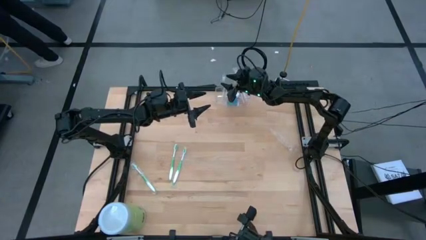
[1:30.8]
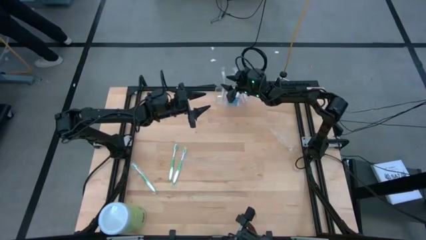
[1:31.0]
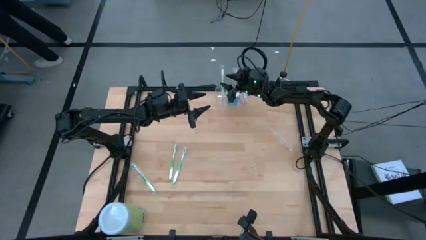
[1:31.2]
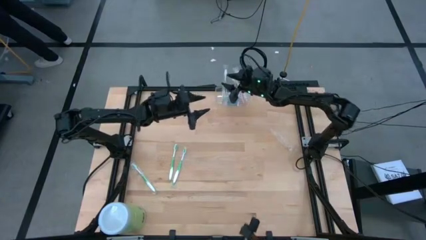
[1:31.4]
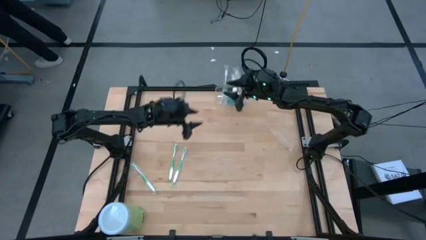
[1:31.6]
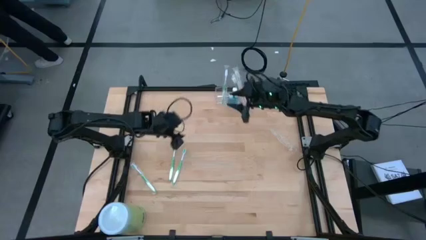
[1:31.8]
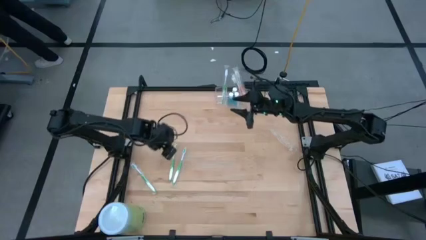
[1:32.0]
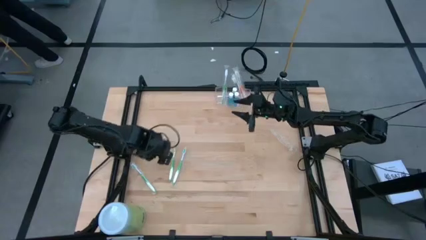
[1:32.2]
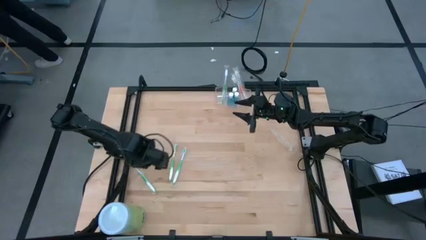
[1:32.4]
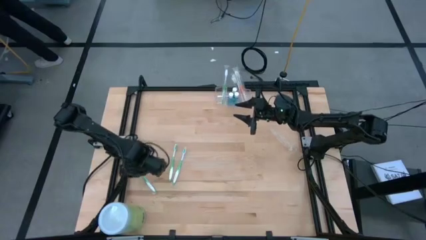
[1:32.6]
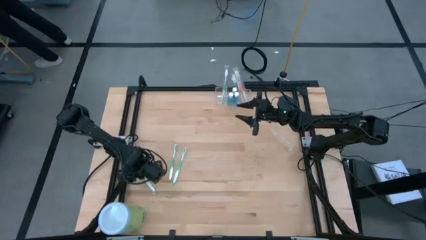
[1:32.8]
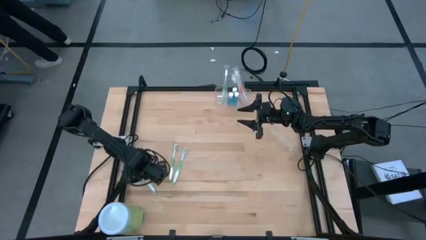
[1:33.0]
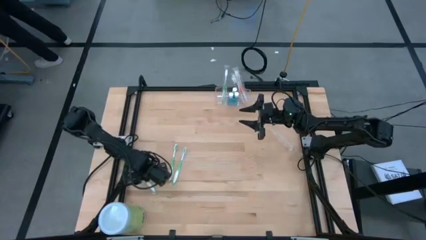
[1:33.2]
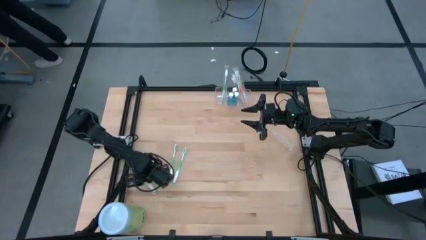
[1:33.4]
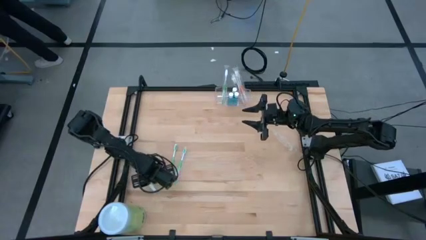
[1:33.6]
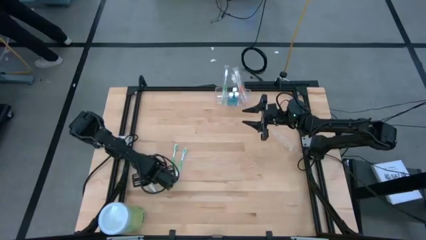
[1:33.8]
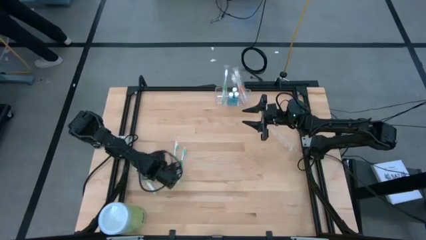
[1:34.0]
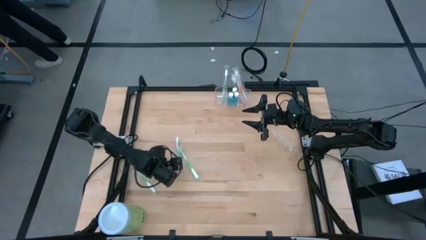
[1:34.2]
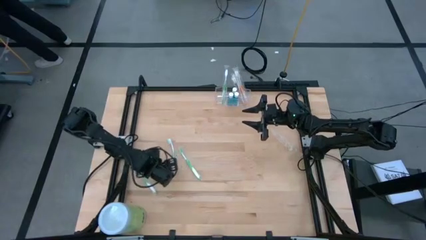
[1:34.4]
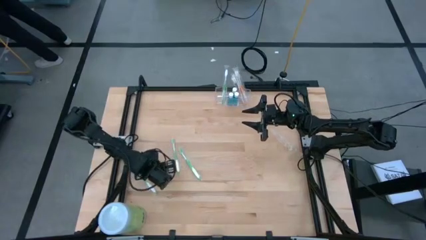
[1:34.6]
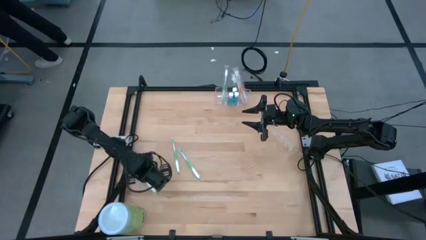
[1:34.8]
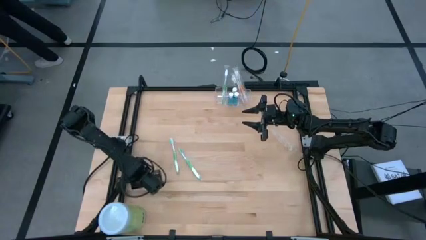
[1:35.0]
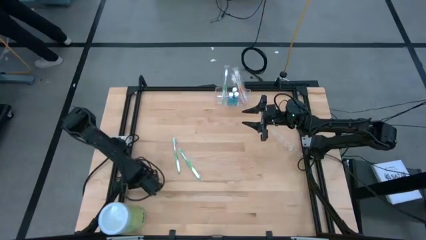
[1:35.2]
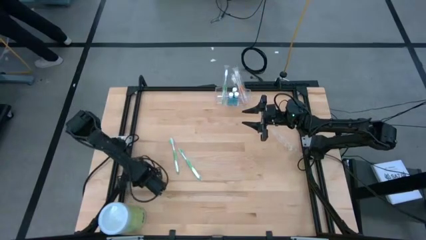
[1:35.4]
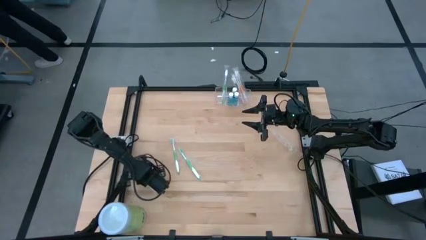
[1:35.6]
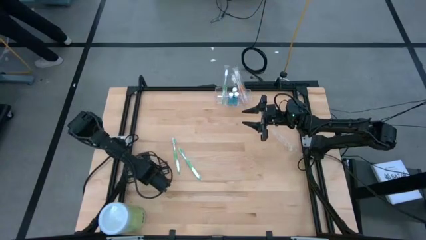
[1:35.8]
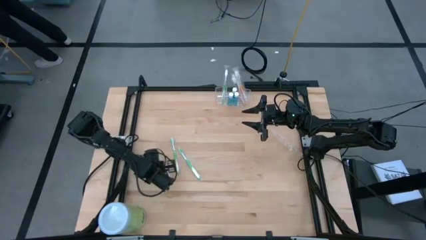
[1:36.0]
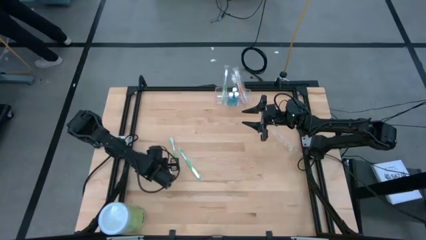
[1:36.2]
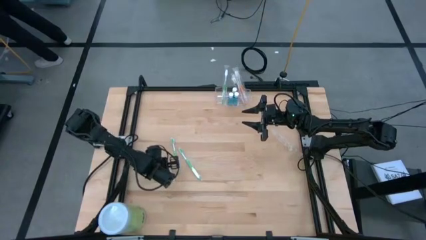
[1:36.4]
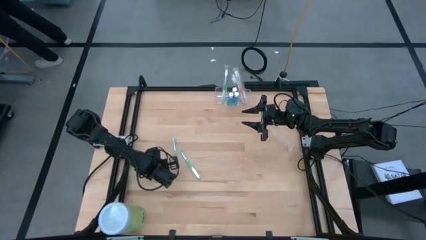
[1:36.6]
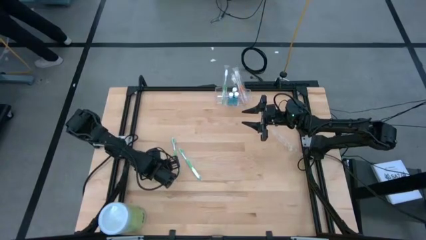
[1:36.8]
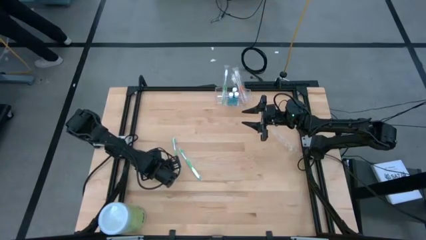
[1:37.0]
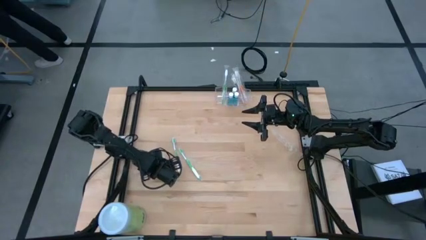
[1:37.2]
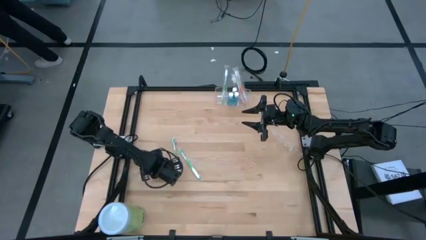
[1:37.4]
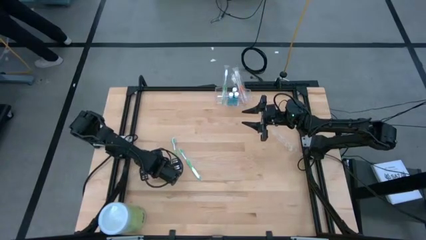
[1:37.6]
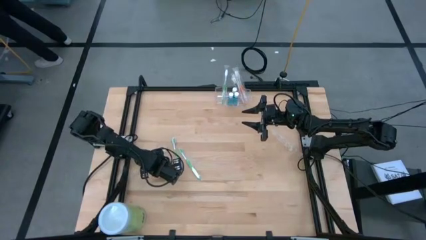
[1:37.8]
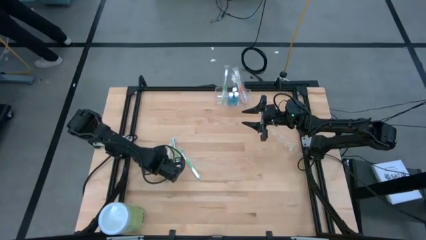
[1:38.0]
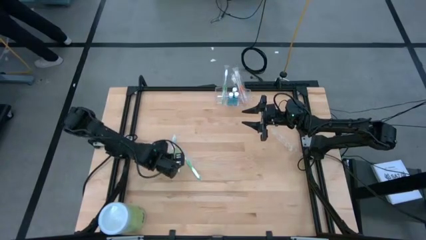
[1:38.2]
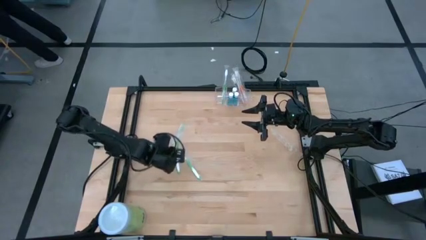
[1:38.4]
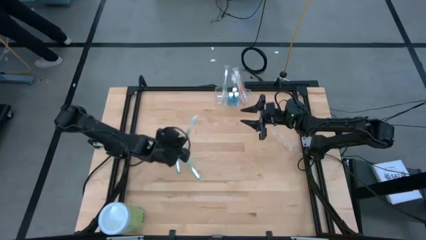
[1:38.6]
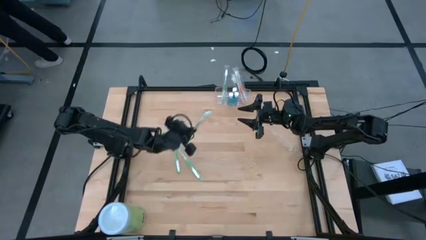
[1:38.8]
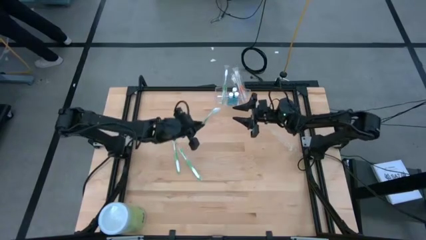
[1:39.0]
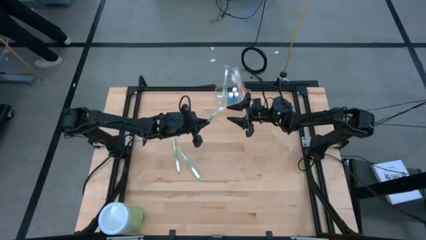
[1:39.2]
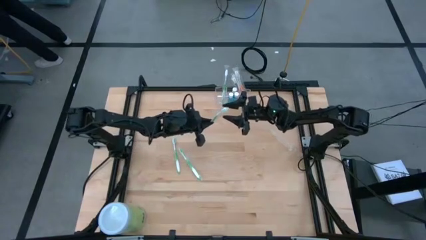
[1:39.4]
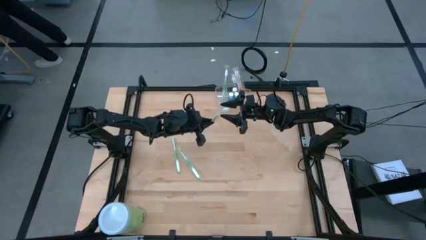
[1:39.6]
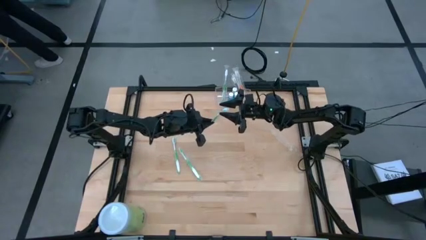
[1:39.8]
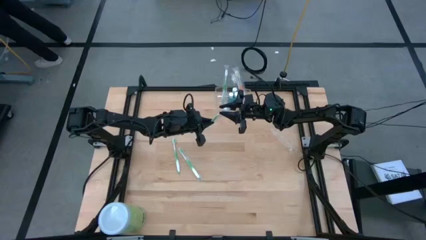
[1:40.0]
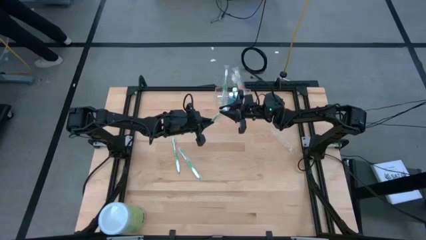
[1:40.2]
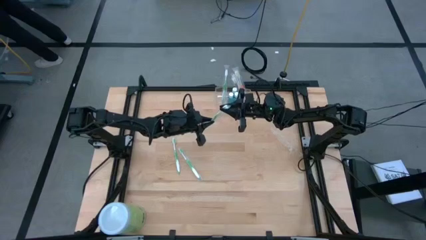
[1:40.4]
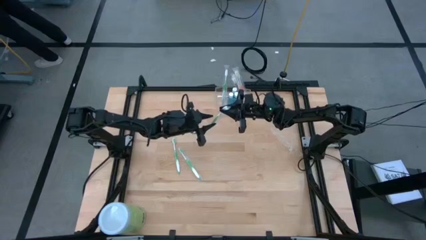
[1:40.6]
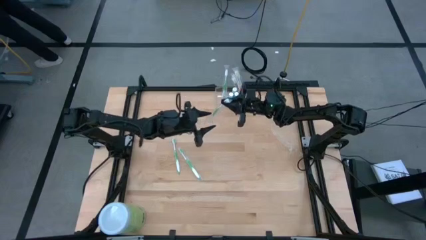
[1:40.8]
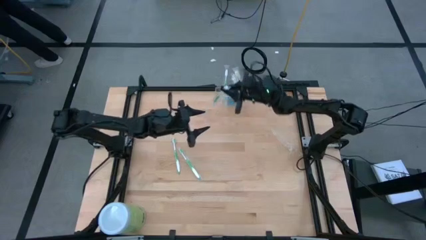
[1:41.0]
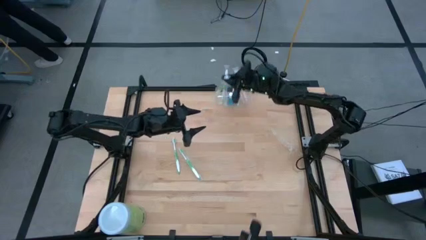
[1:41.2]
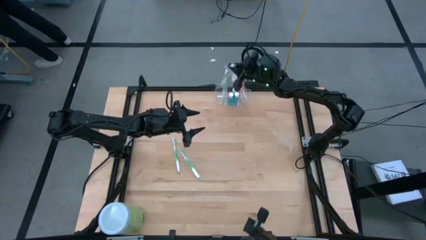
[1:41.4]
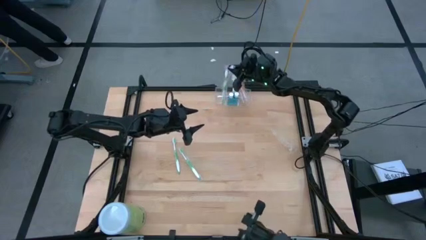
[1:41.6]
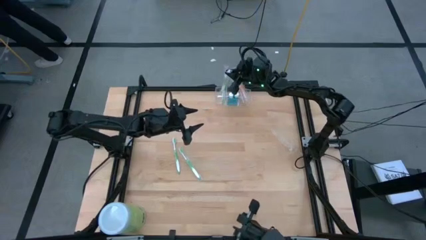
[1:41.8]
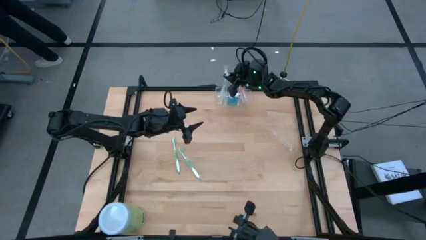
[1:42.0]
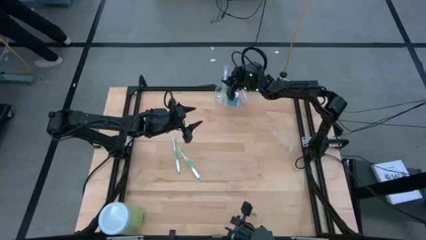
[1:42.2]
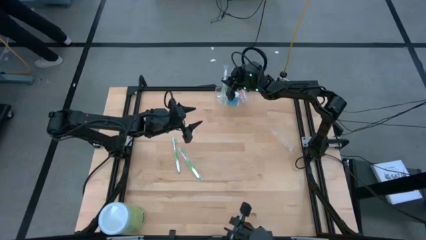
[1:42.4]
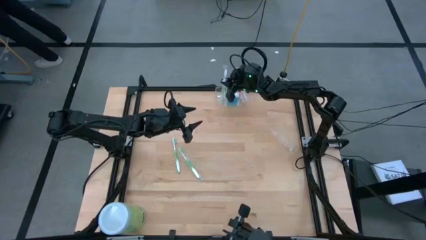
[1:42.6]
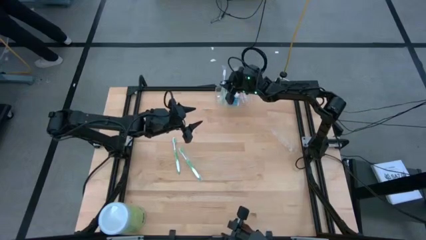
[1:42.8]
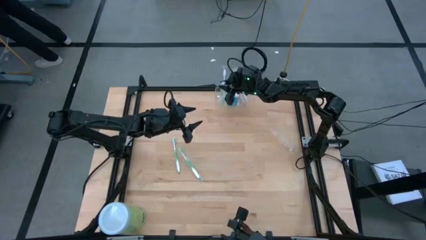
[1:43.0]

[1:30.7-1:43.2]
Task: Pick & Place toothbrushing station
Put the green toothbrush into the transparent organizer
